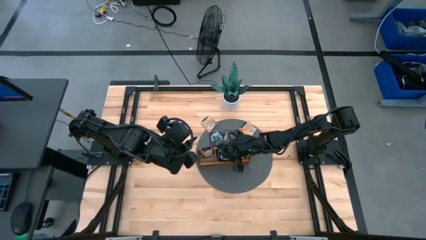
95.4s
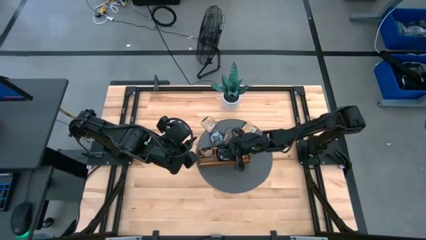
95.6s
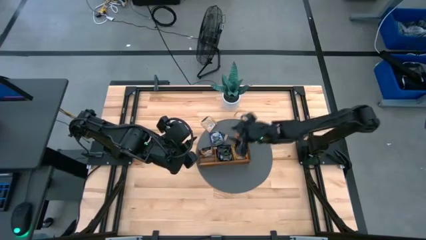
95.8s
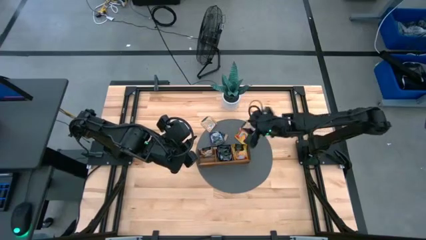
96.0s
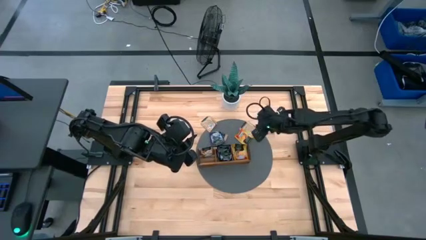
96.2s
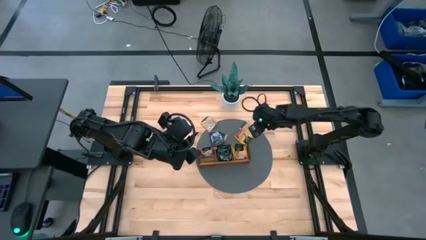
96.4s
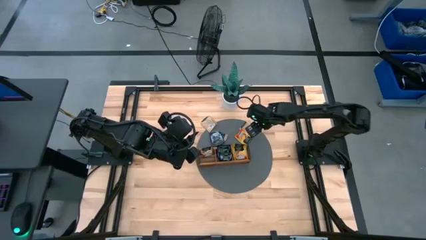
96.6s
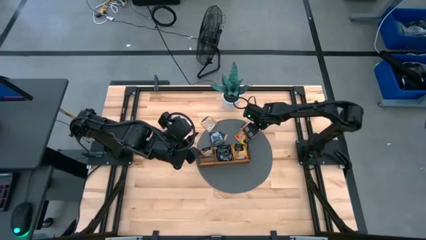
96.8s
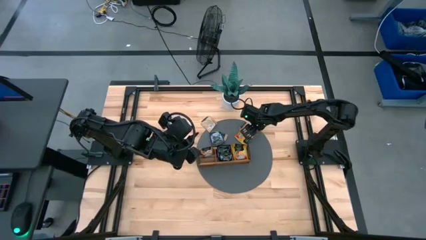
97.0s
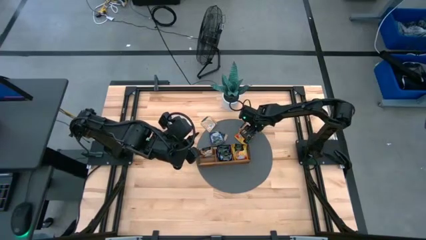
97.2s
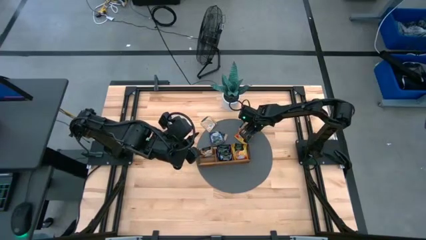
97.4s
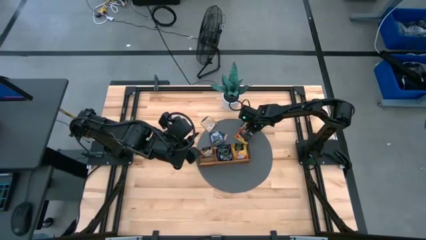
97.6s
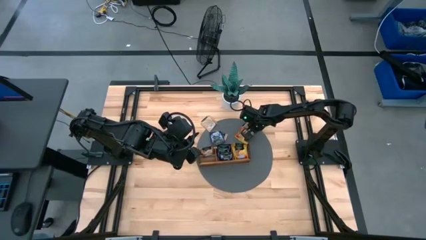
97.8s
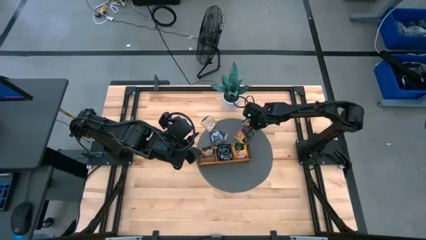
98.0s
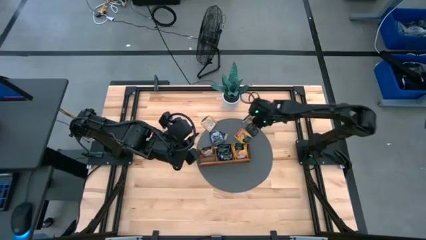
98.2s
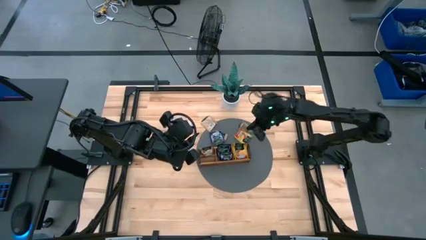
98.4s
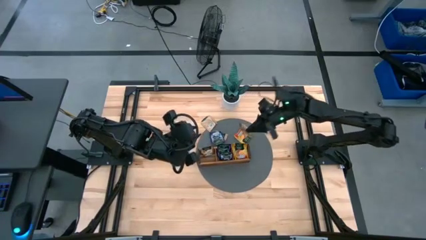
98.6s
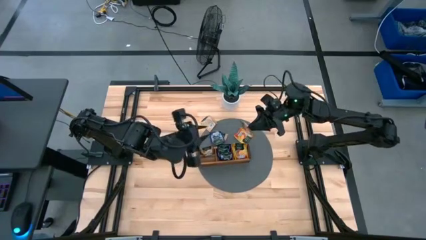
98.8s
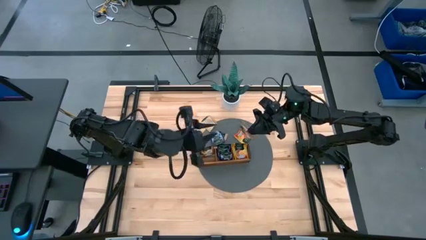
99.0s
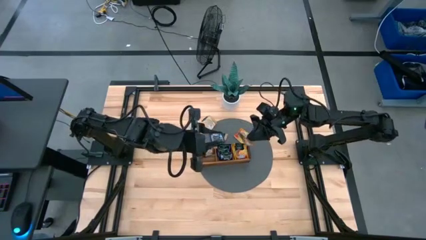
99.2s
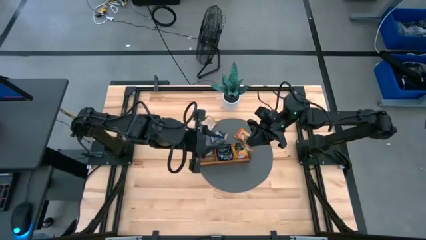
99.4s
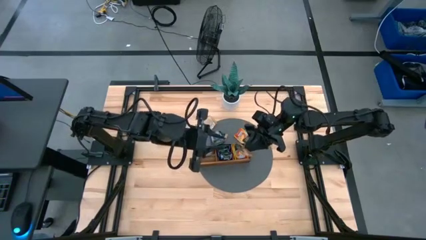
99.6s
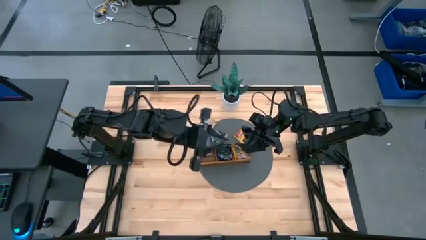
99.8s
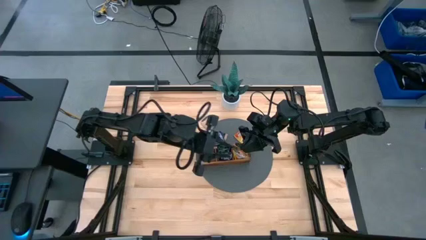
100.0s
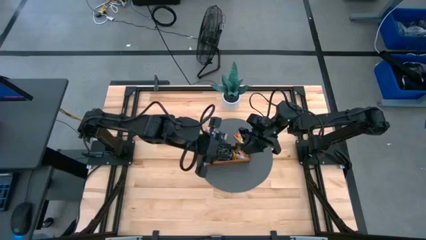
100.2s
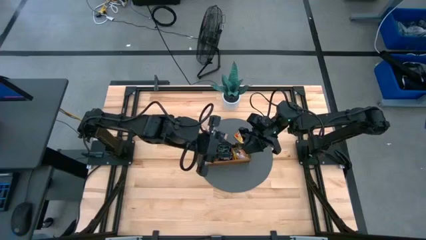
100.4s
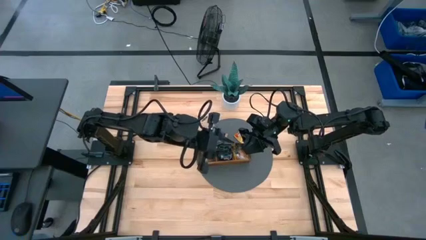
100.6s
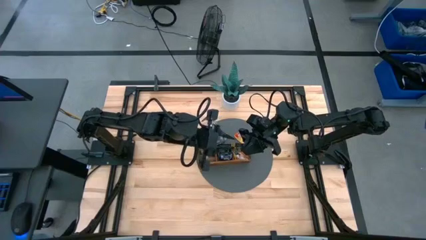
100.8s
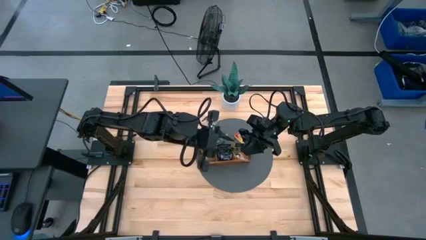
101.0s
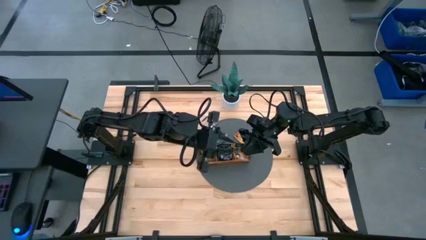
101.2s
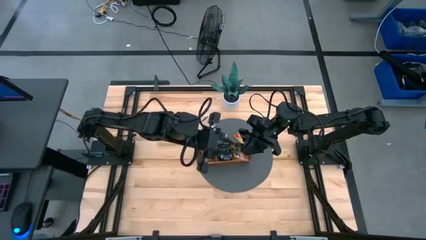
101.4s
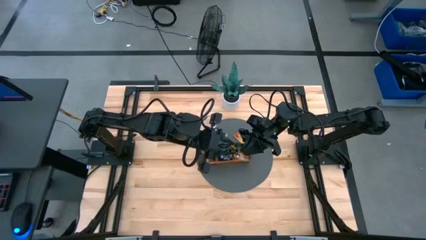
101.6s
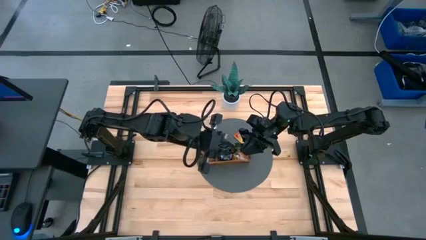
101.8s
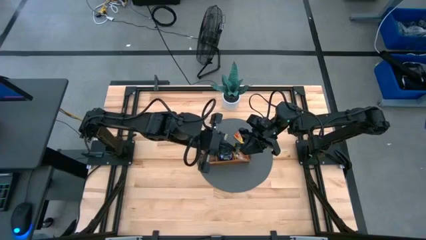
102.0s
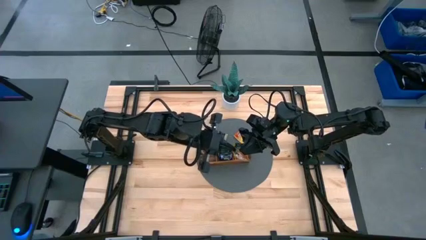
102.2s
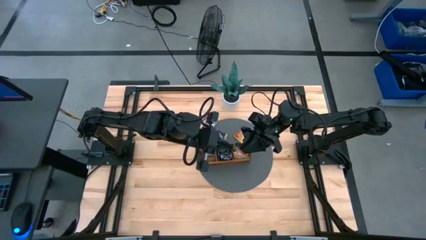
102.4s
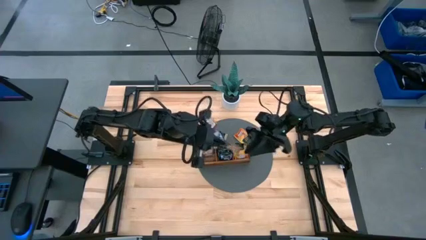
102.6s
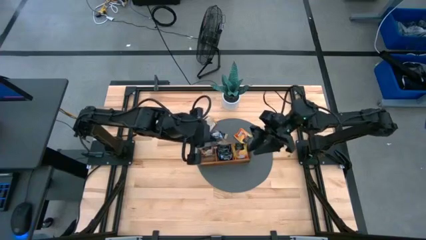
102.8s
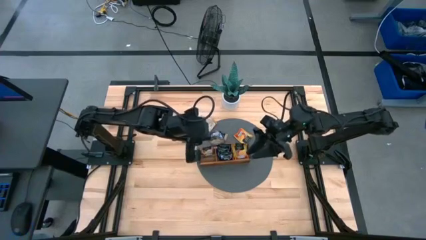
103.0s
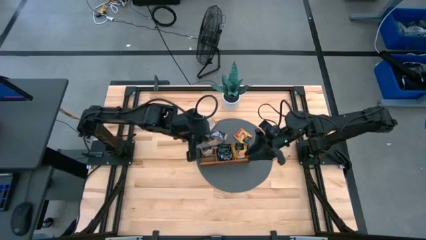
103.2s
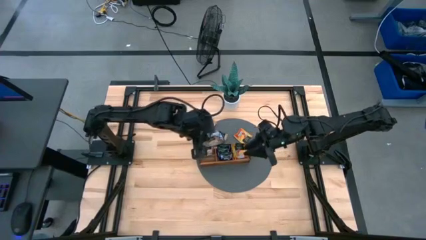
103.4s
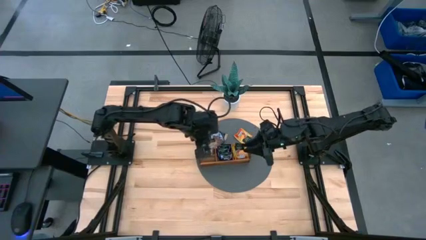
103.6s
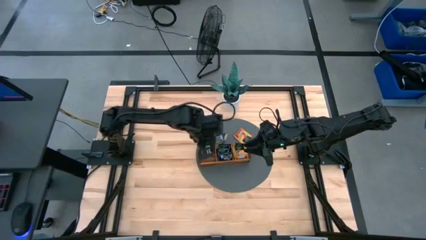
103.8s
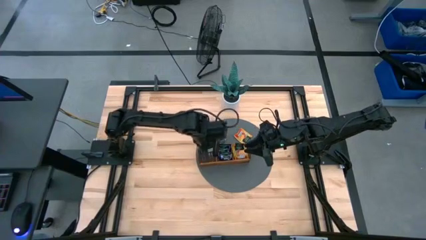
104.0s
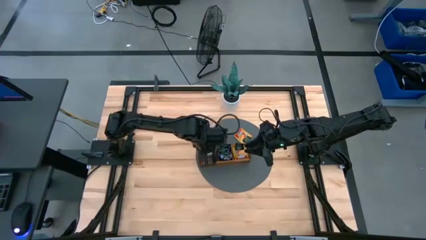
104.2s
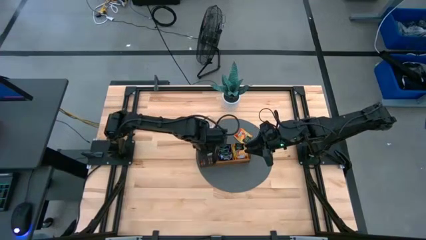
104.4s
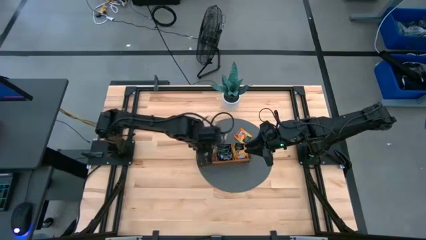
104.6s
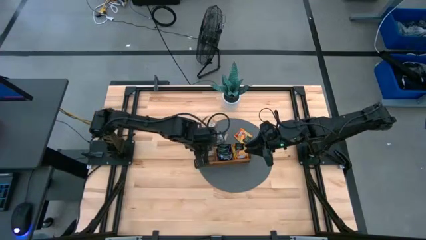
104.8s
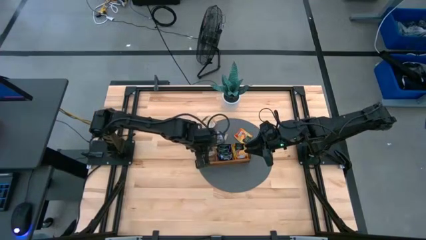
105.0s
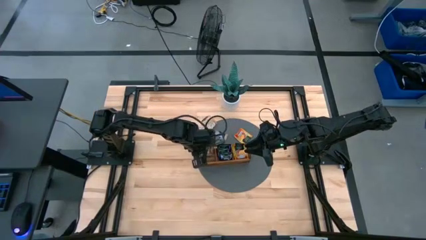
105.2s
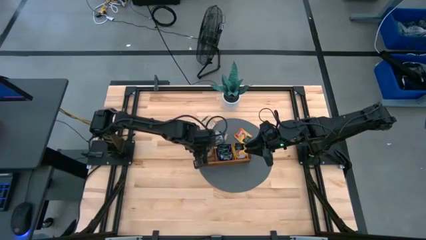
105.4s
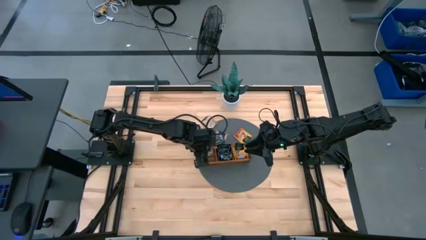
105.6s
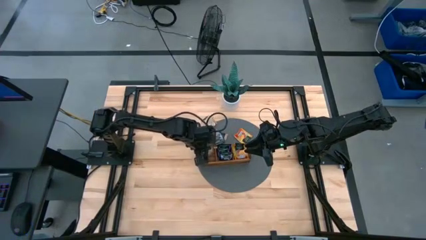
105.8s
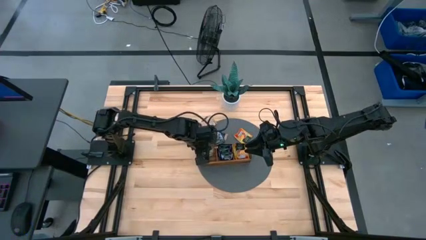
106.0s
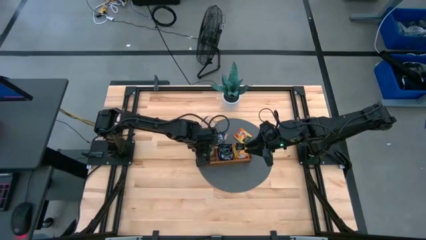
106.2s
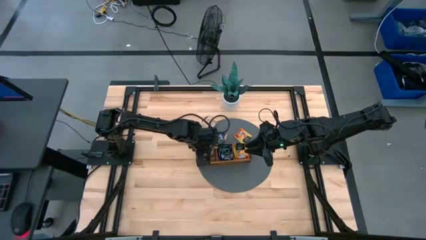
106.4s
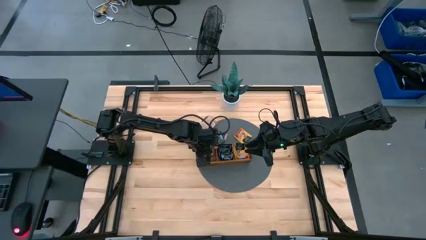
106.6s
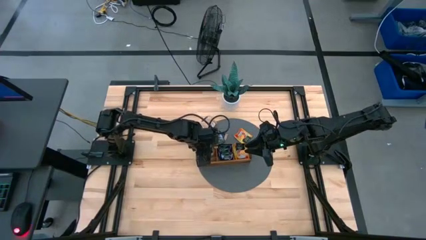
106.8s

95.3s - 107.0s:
Task: Pick & Place Tea
Put the brown tea bag into the left section of the wooden organizer

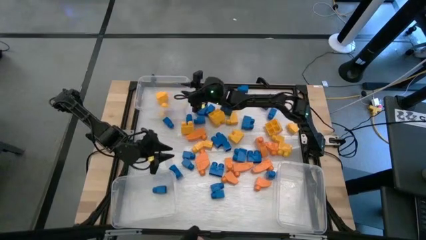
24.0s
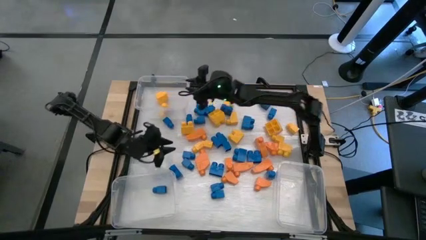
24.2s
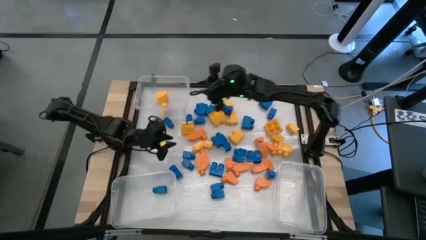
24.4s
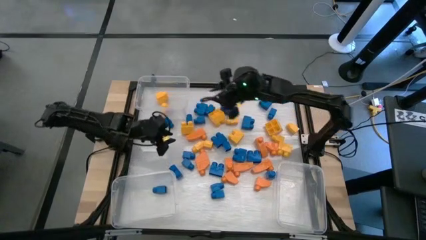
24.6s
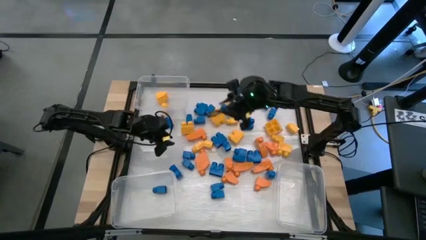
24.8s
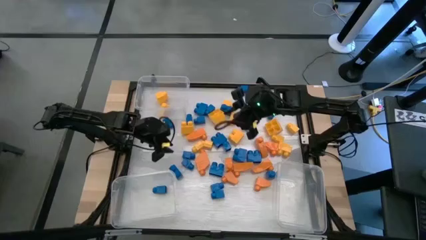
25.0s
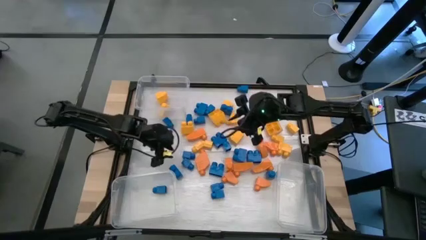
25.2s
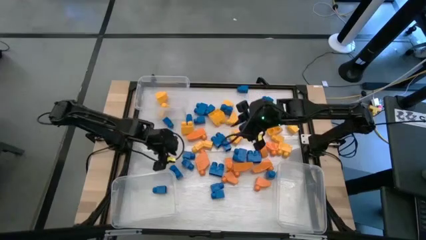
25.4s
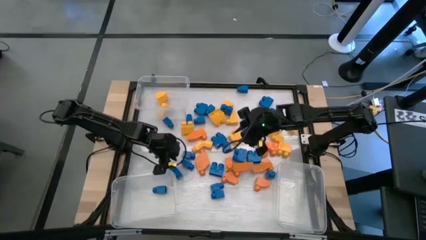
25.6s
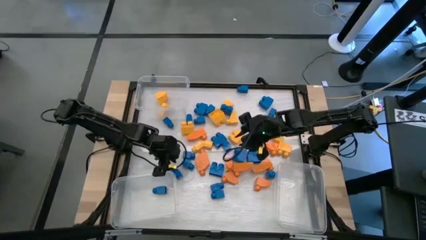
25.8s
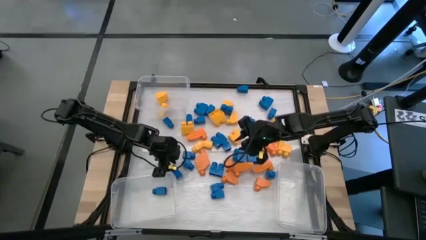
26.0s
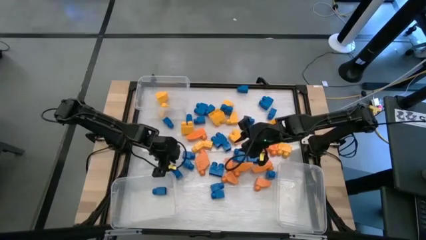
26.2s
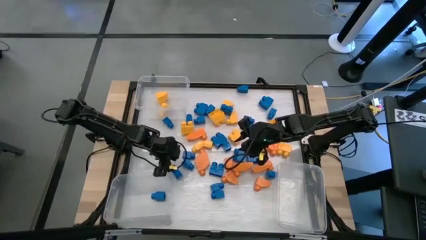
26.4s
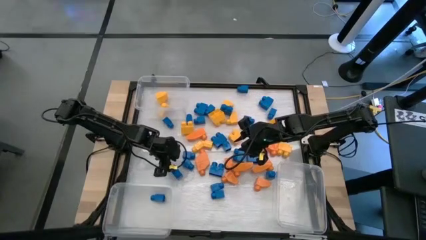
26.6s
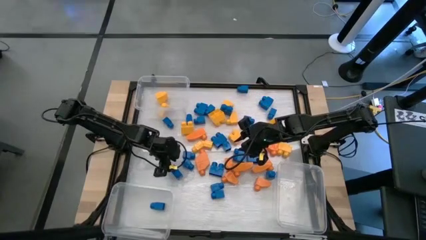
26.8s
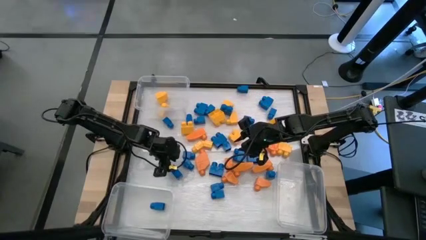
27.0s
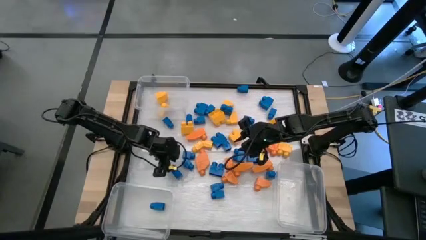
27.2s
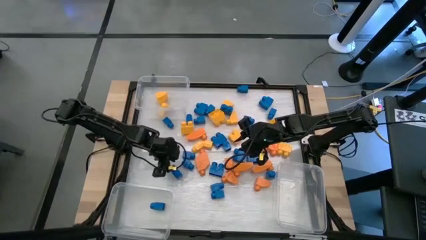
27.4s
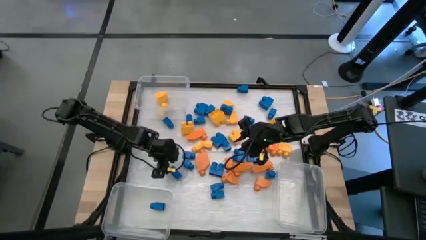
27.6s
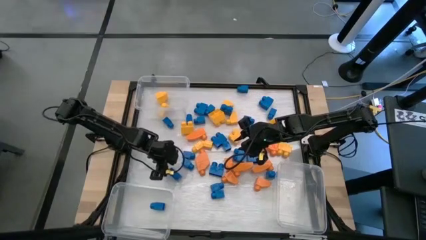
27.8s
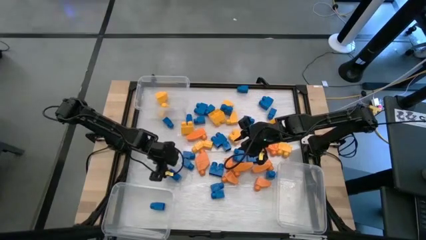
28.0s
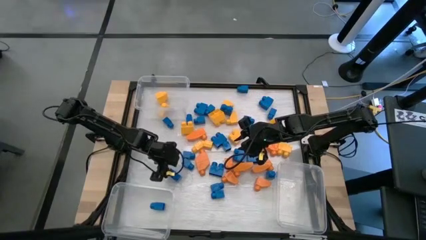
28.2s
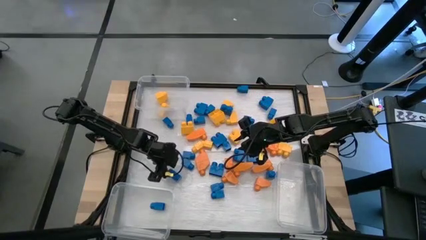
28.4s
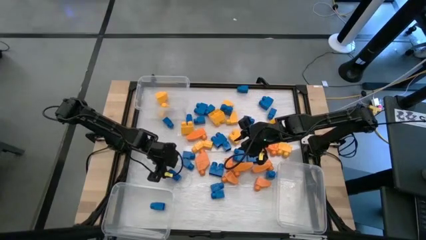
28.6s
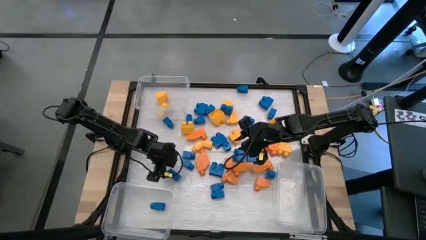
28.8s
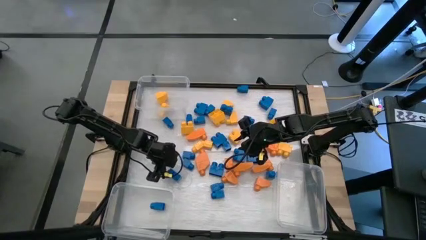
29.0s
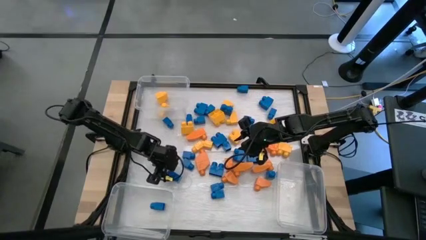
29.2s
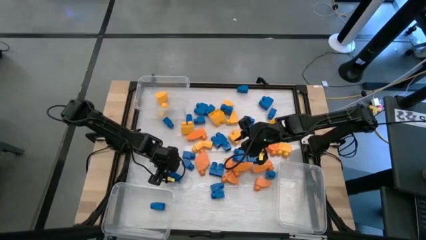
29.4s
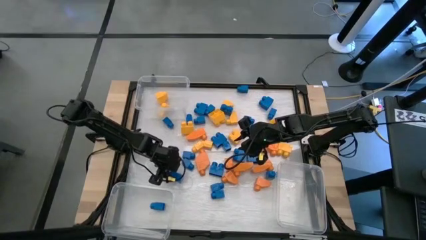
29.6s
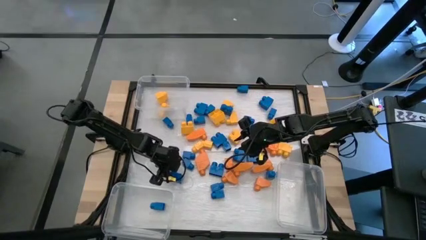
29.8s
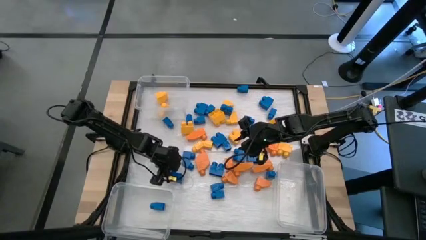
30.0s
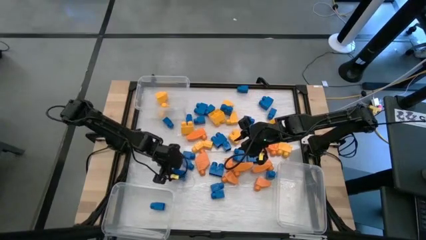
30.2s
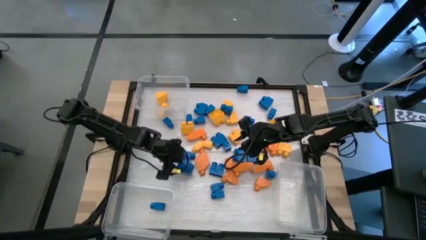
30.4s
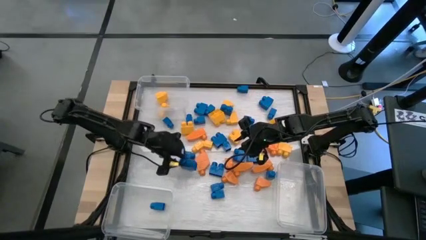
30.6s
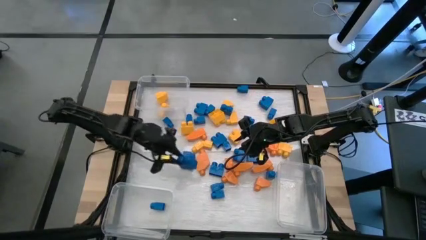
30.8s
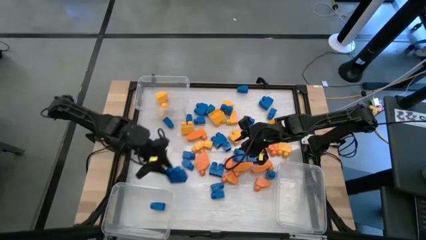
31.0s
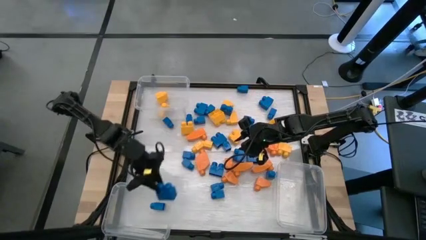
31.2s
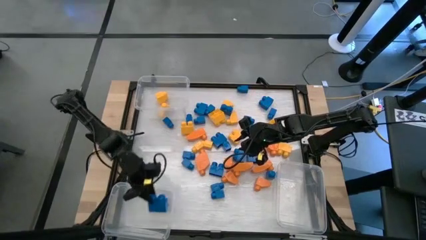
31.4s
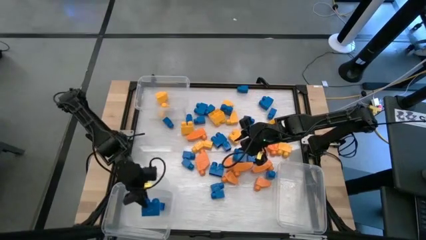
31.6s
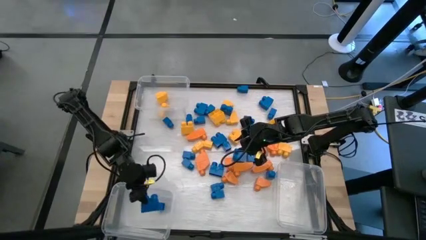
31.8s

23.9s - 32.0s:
Task: Sort blocks
Put the blue game piece into the bottom left transparent bin
